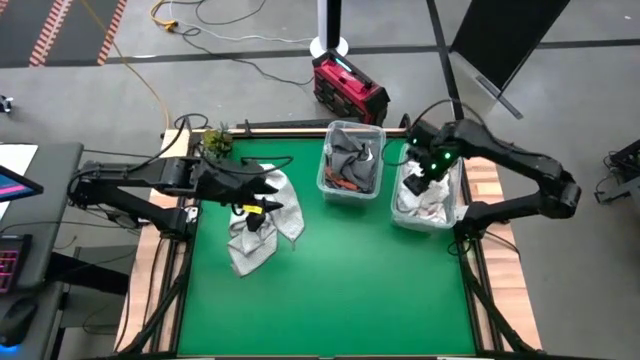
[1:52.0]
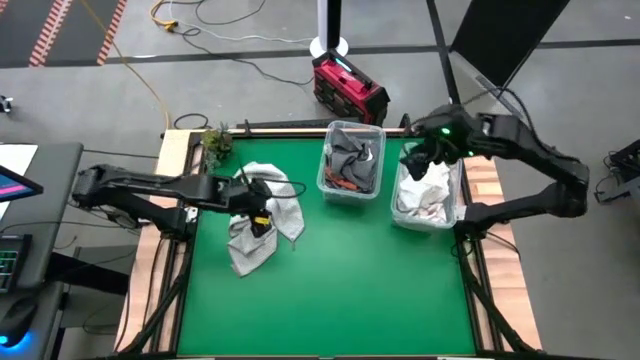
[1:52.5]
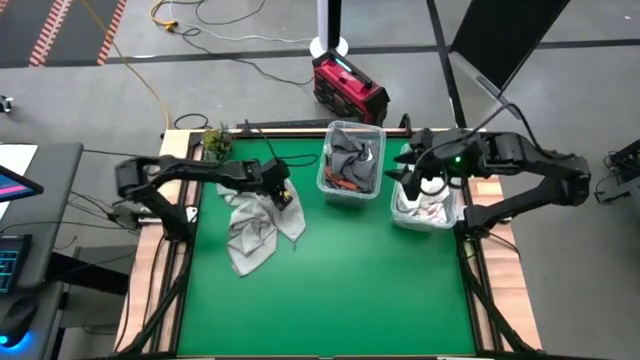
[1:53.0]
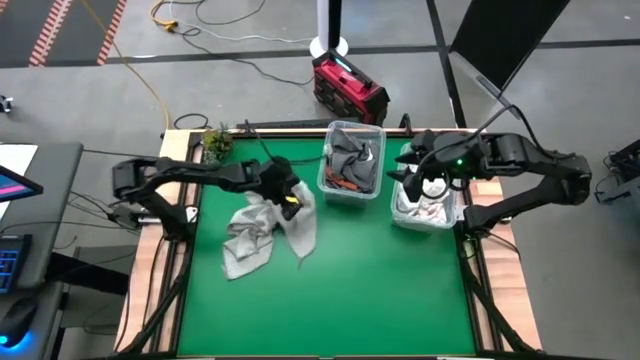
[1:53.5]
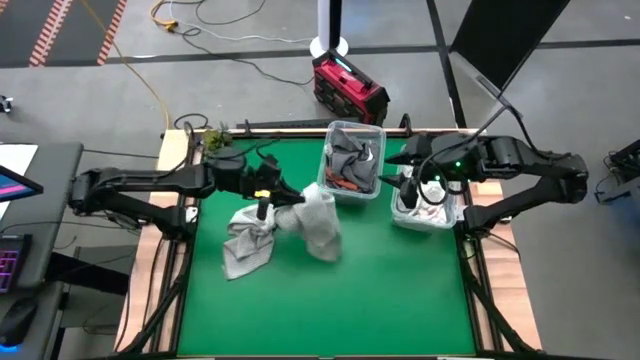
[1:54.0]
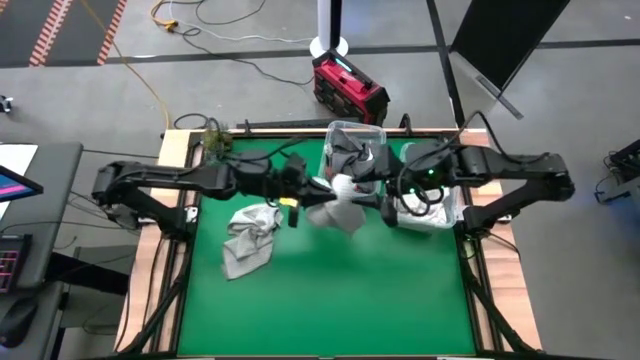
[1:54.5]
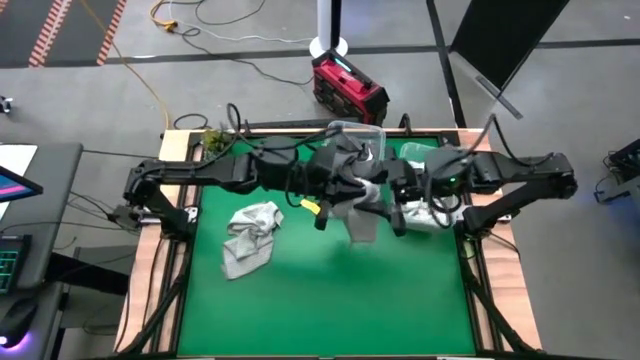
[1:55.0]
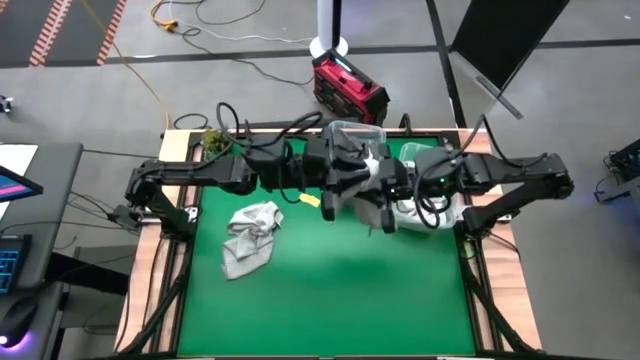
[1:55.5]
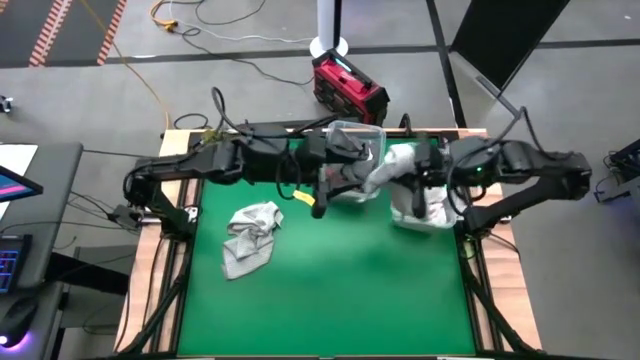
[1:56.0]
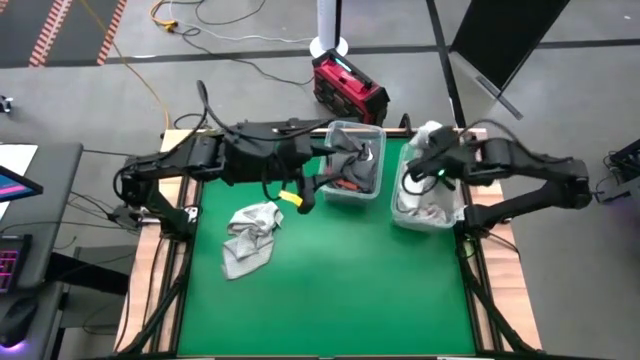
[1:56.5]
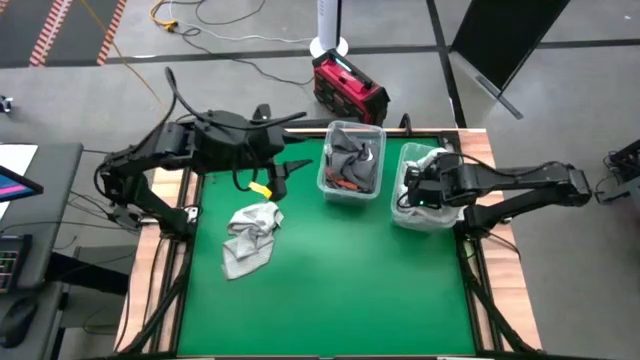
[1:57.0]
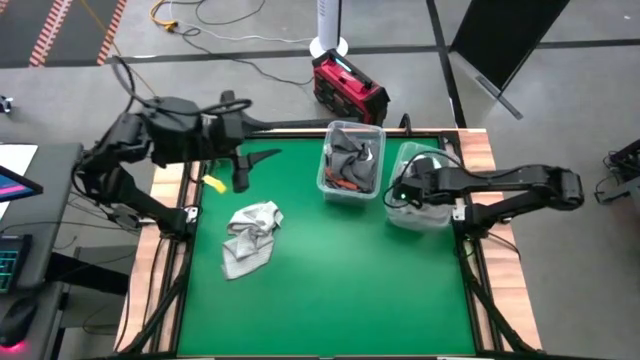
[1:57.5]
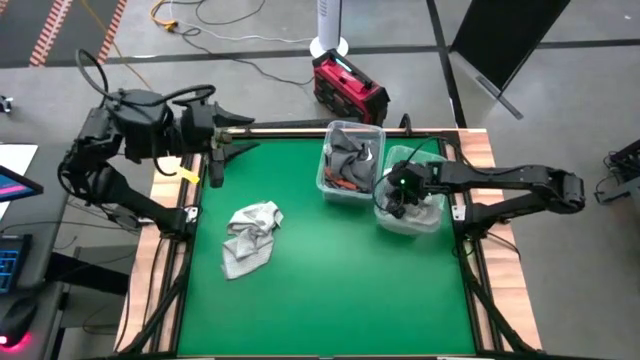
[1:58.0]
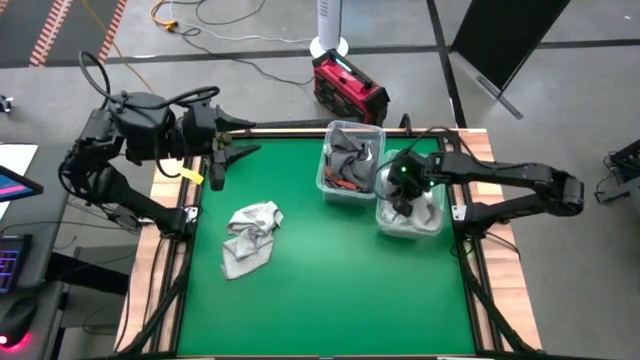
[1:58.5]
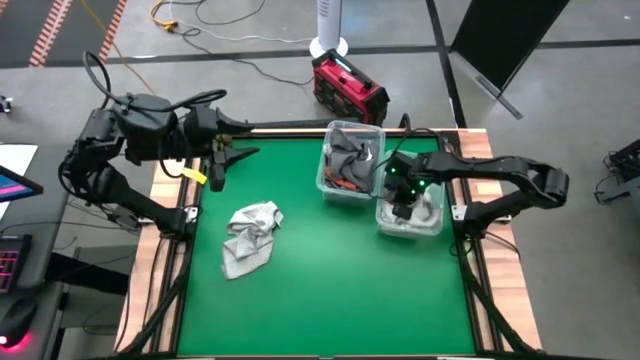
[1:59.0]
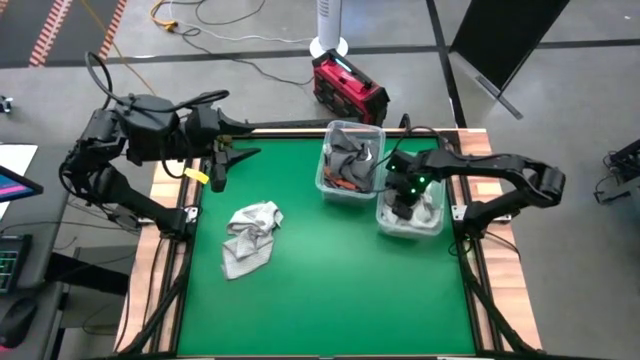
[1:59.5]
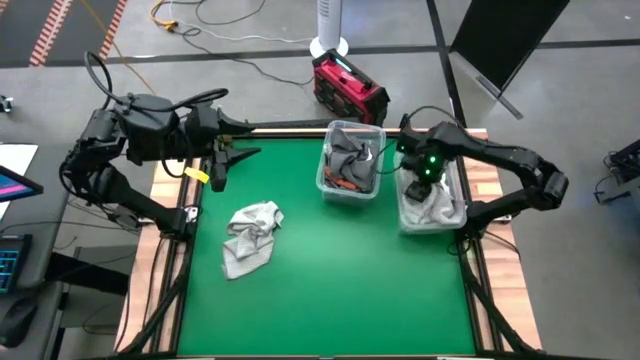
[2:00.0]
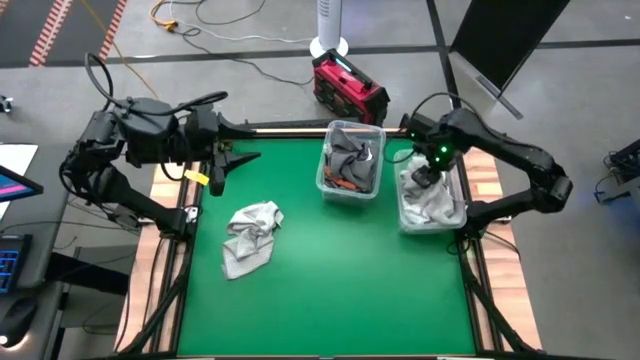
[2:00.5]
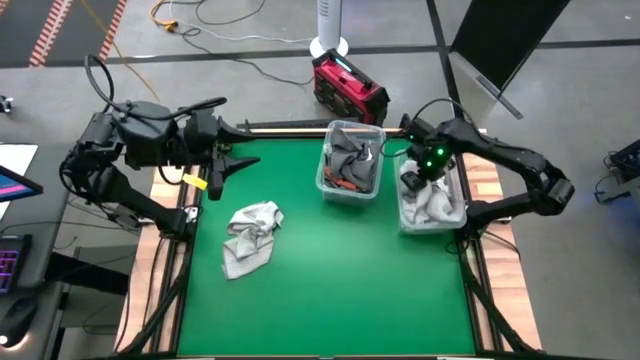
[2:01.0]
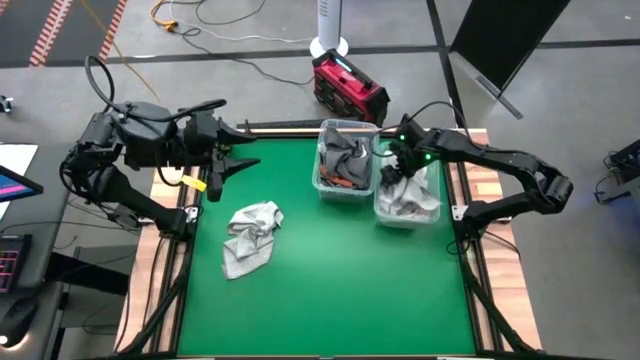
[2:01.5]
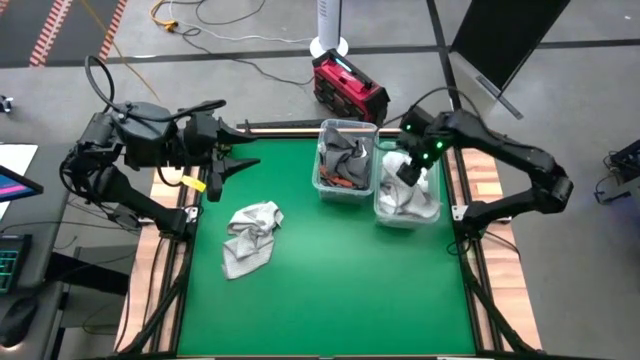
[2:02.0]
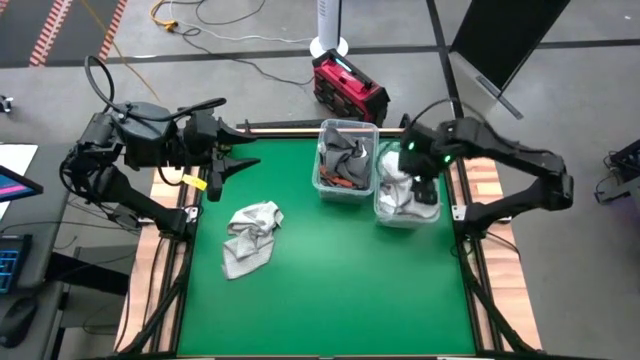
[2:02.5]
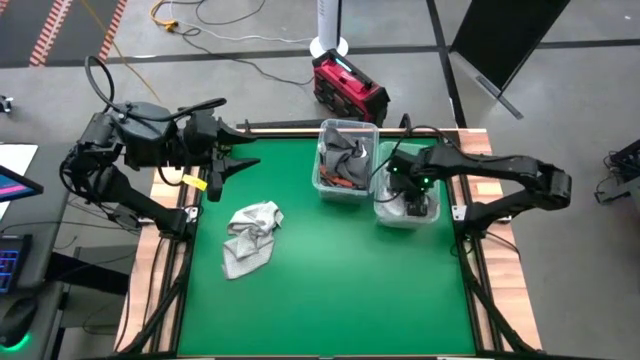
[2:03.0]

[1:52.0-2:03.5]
Task: Sort towels by color in basket
Put the top gray towel into the right transparent bin

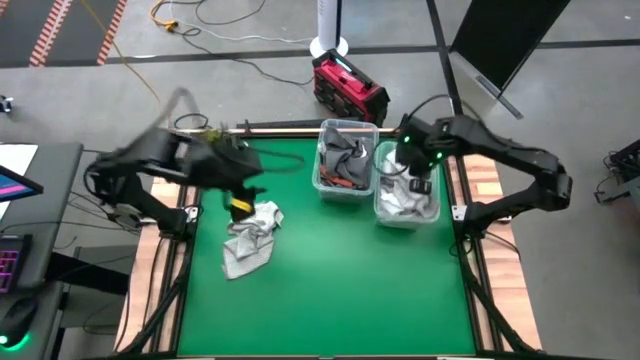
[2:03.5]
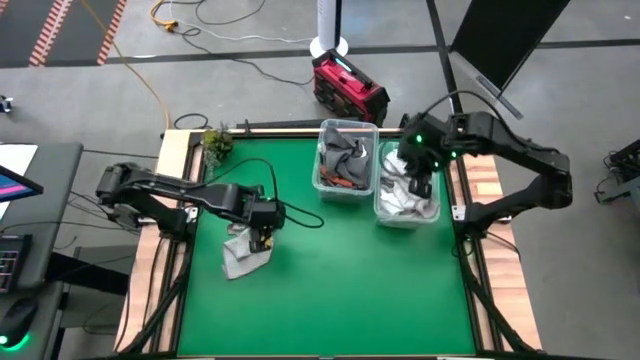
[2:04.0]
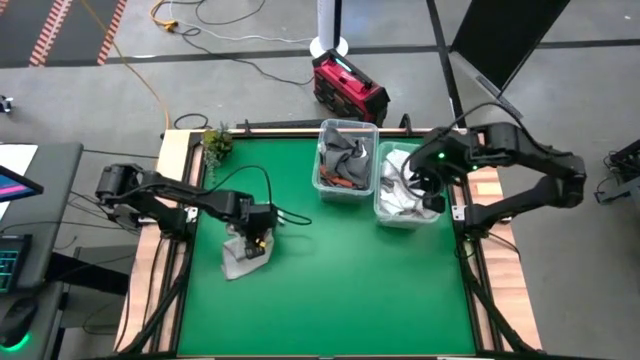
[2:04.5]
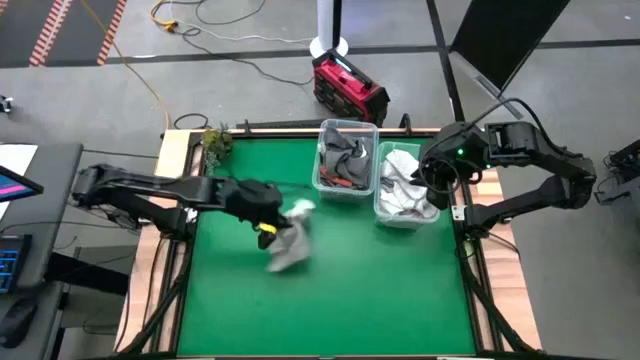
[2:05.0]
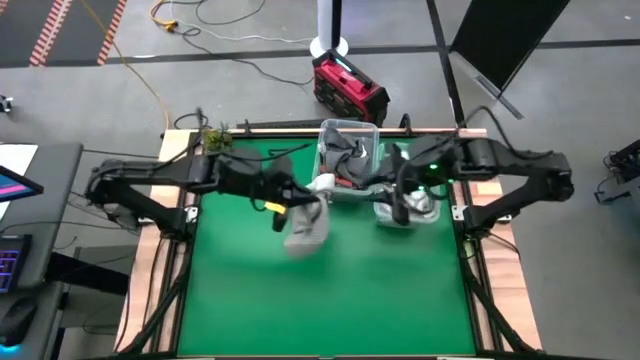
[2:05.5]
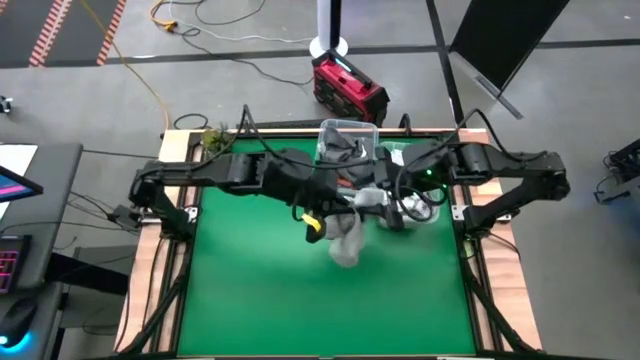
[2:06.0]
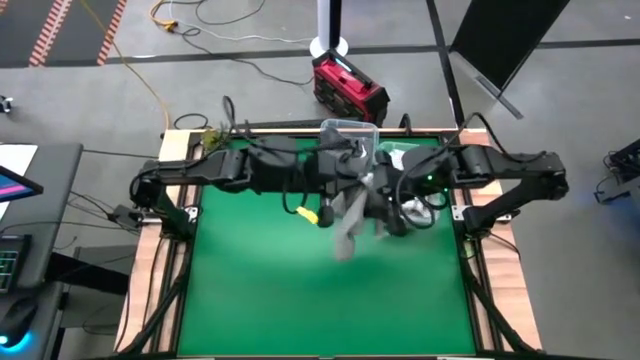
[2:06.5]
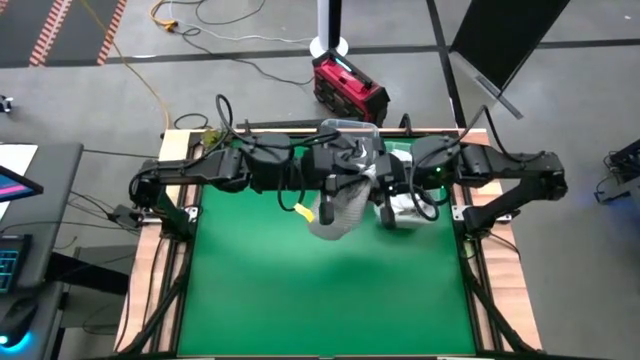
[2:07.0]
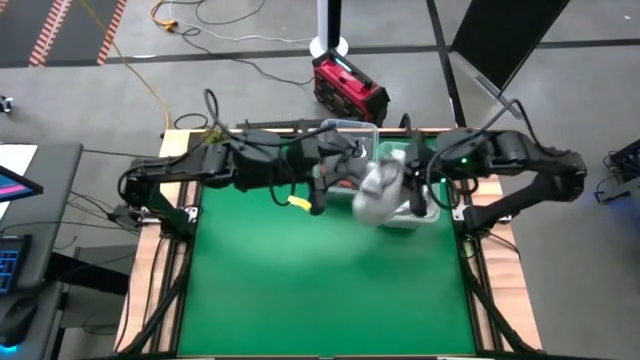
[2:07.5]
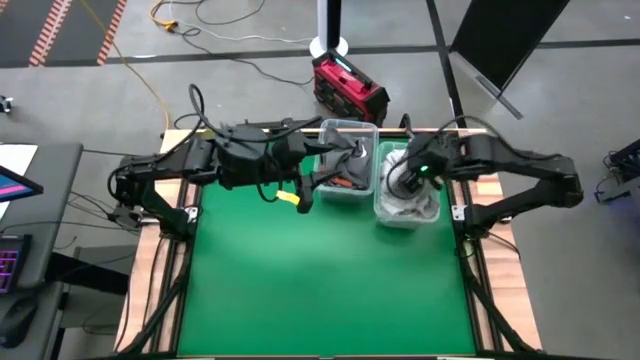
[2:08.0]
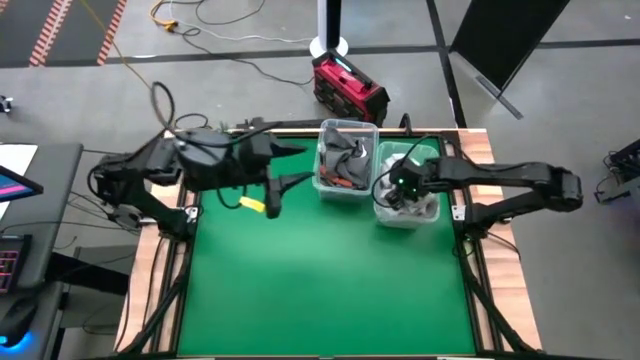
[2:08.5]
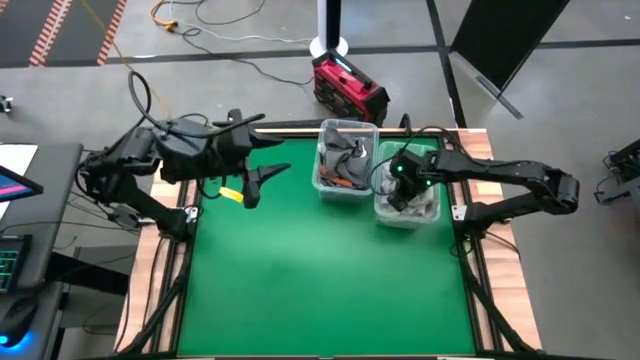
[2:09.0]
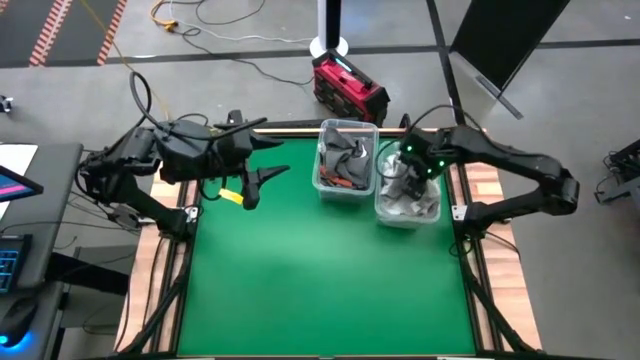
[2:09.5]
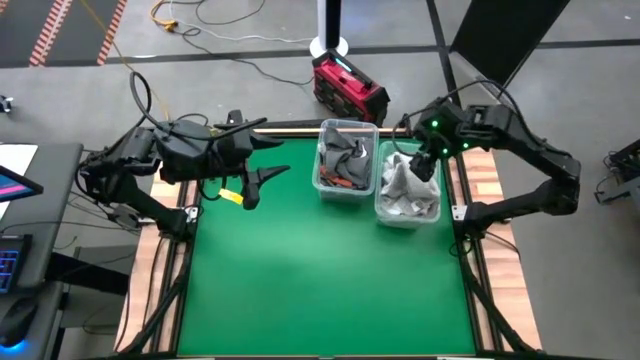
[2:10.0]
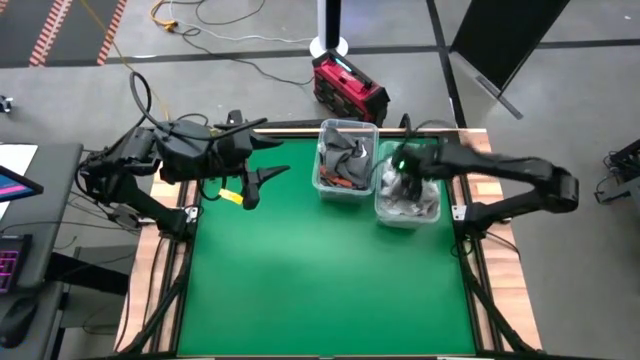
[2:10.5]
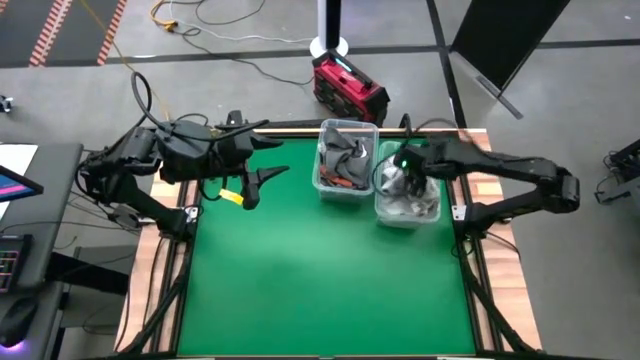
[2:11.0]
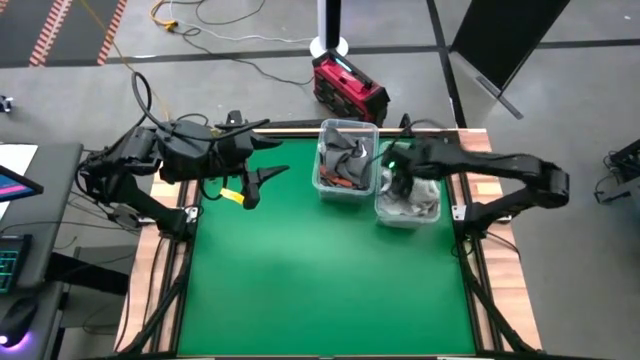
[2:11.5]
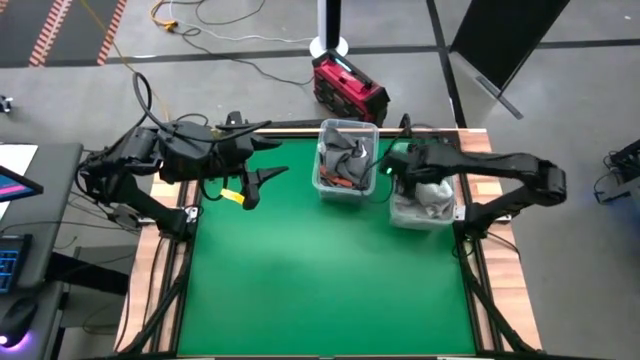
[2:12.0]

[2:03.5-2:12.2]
Put the gray towel into the right transparent bin

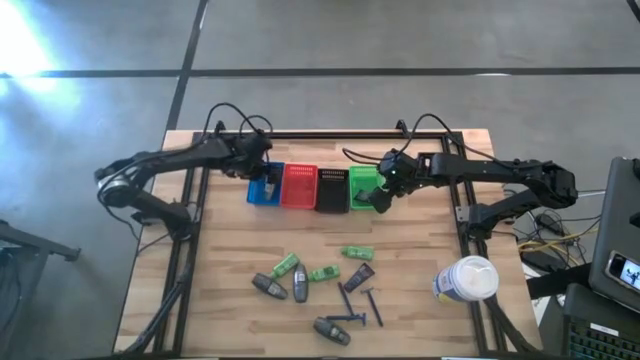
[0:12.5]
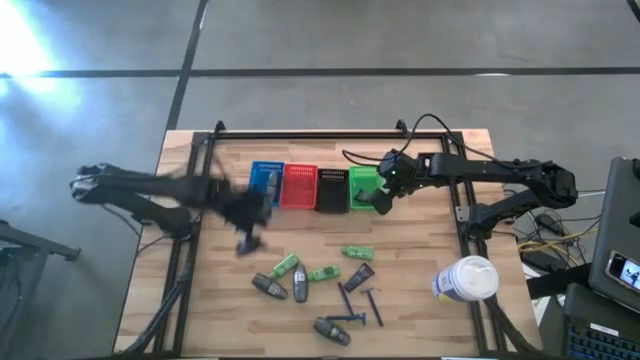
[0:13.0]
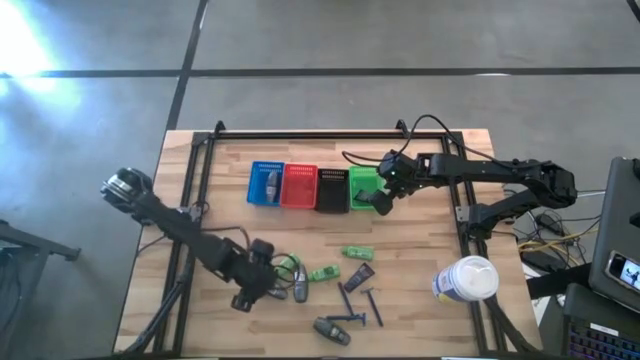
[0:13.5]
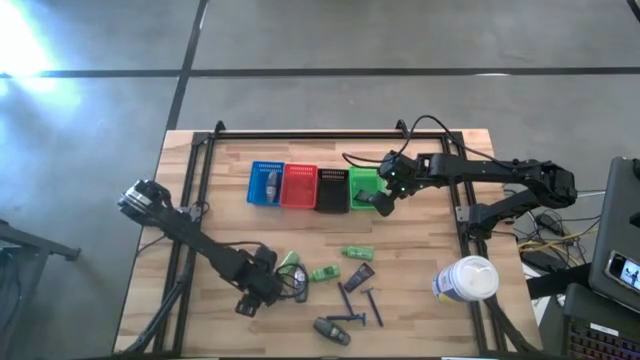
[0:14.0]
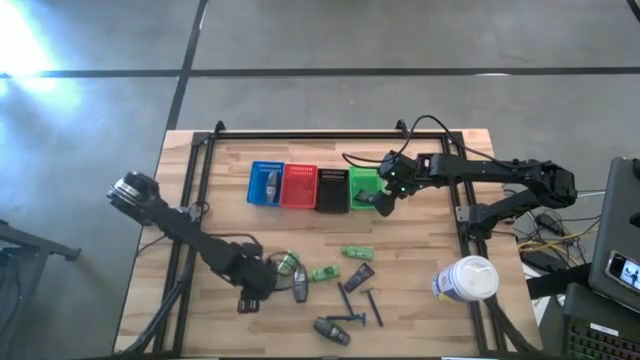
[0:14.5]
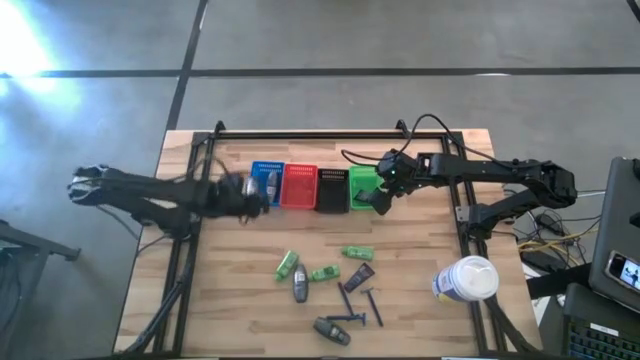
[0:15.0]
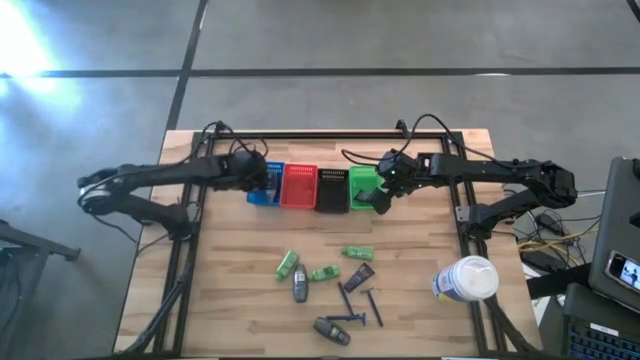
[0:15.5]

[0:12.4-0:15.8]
Task: Pick & Place Travel size toiletries
Put the deodorant into the blue basket
